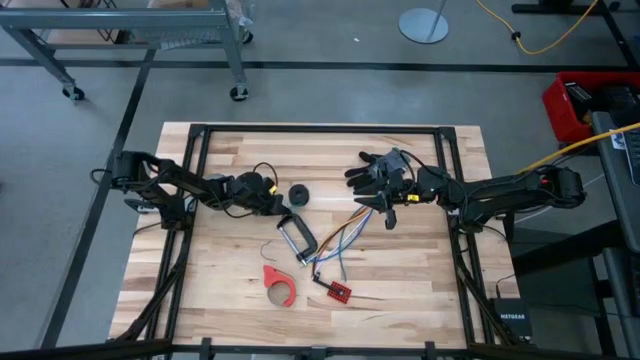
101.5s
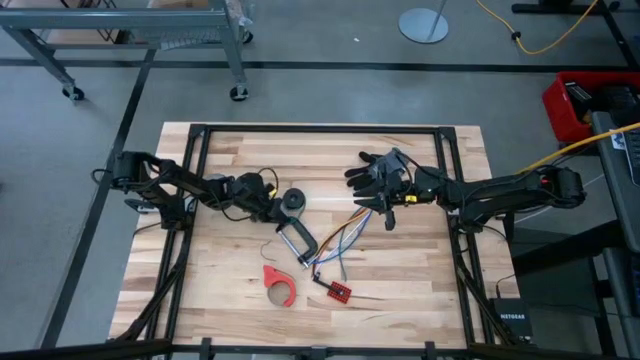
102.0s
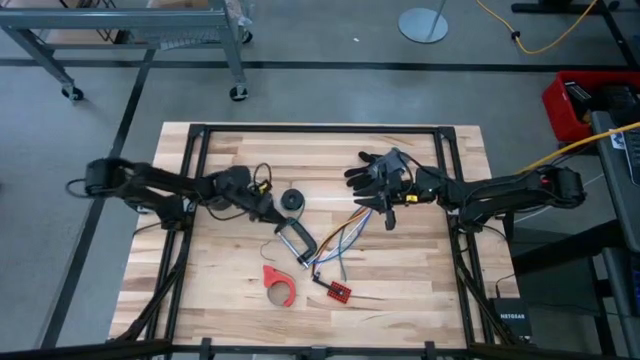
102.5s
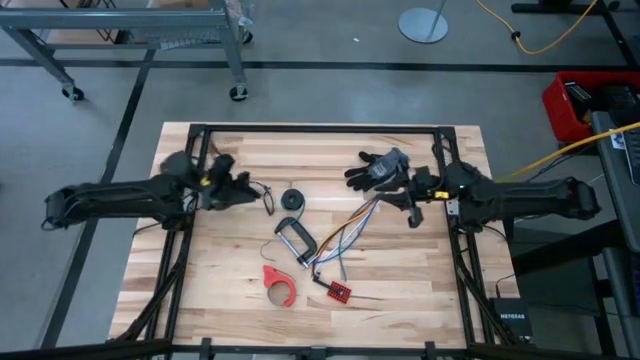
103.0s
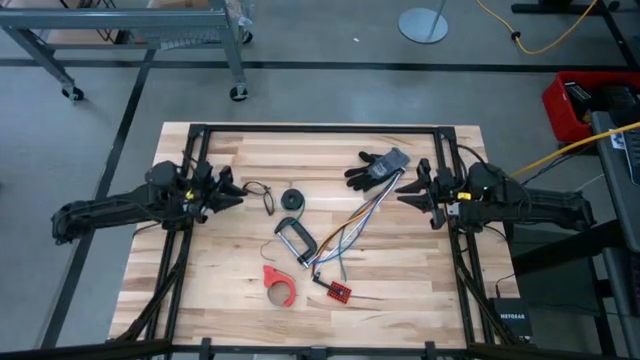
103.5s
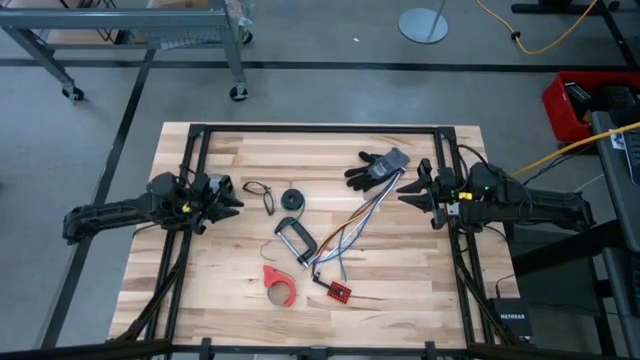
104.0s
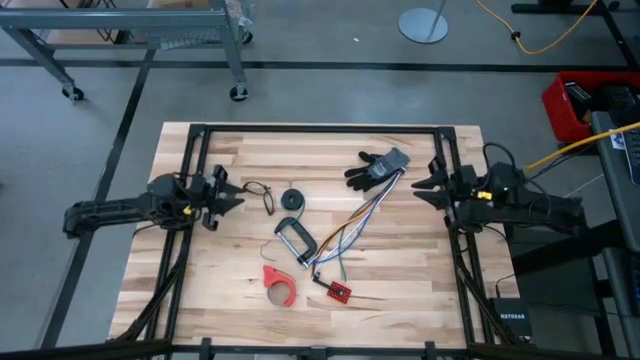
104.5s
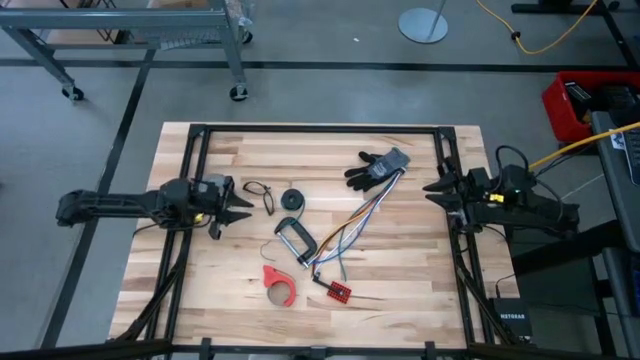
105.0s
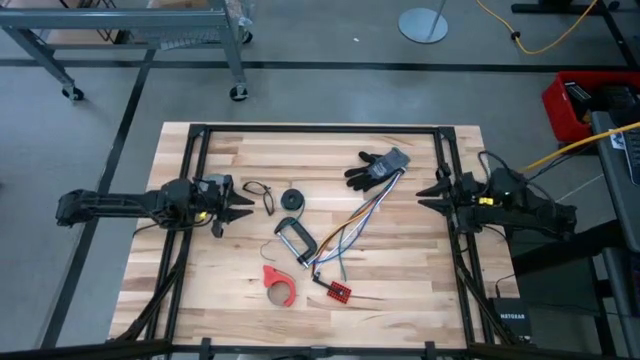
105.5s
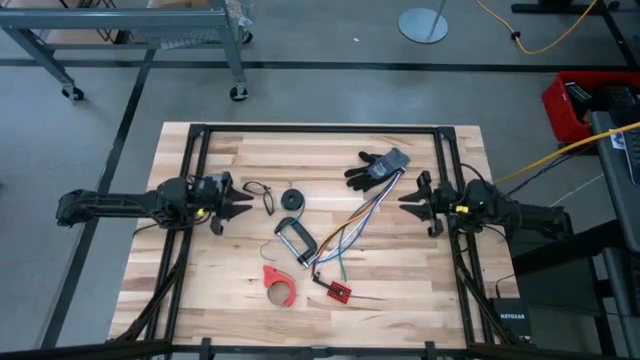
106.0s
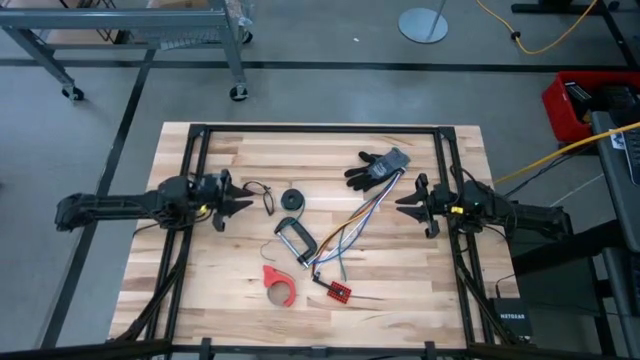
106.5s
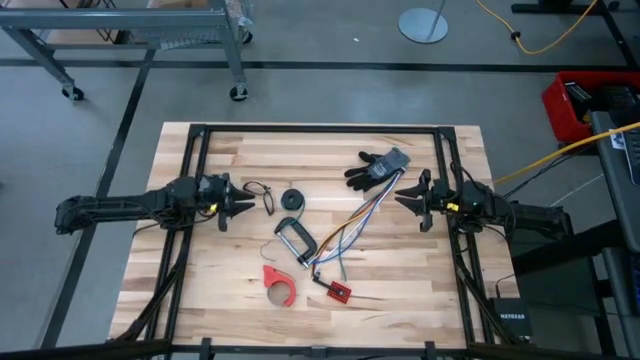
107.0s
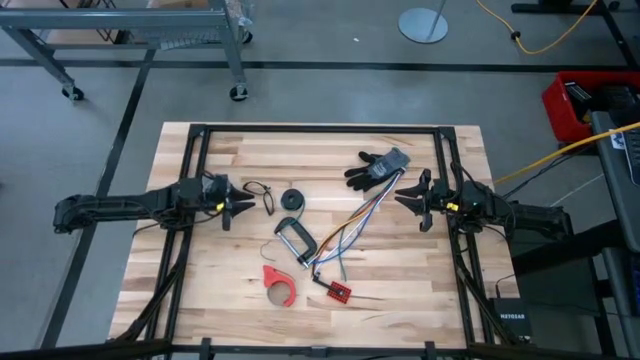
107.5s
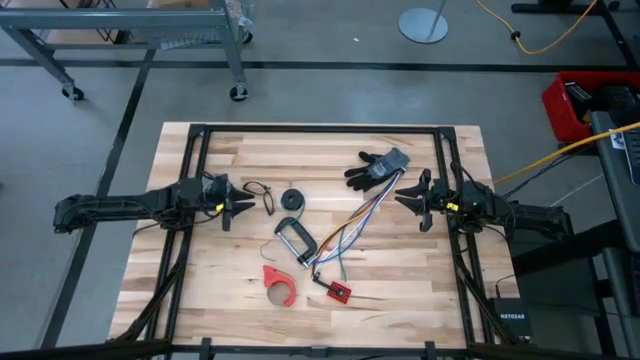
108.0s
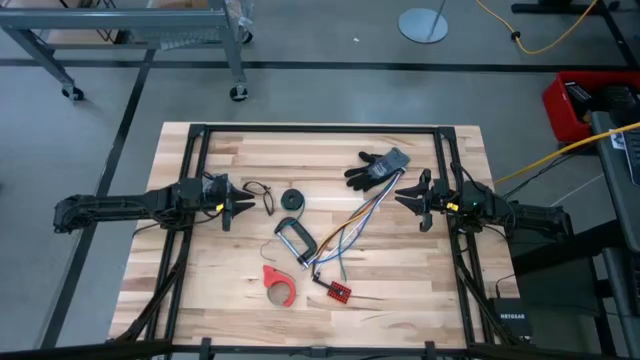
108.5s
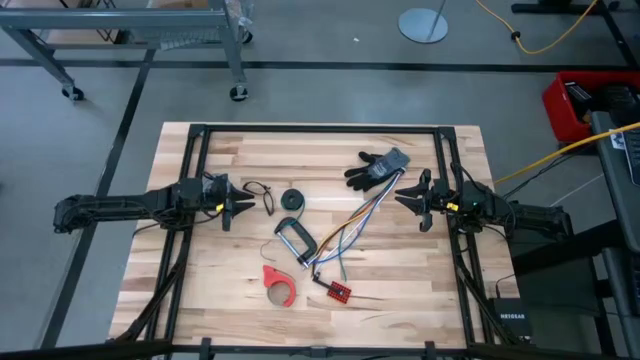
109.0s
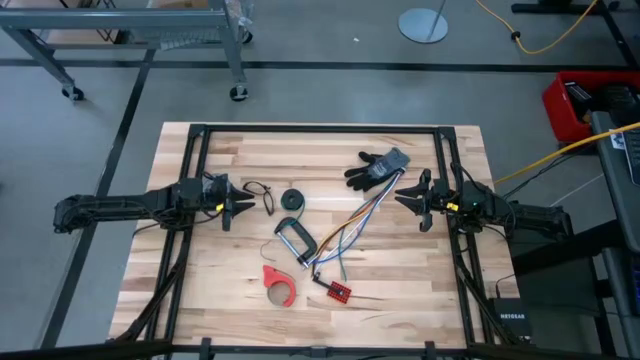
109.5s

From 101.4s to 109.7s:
Task: Coil cords
Return to Home Position

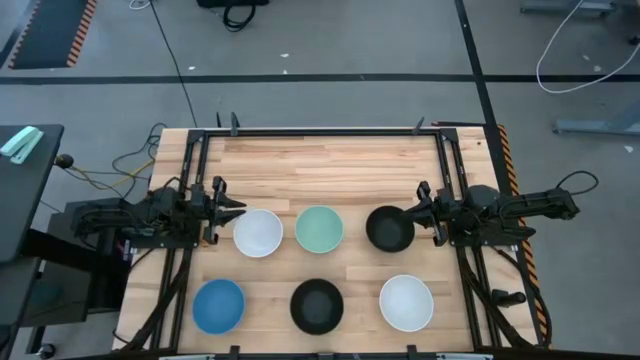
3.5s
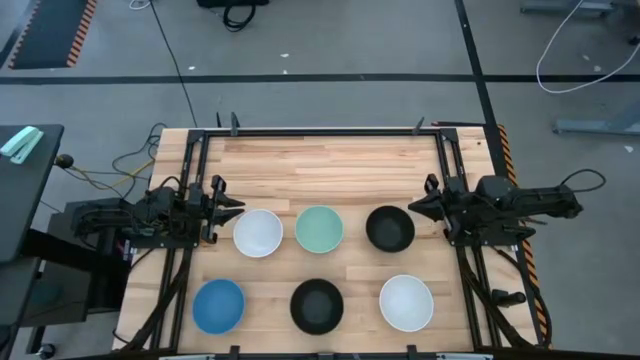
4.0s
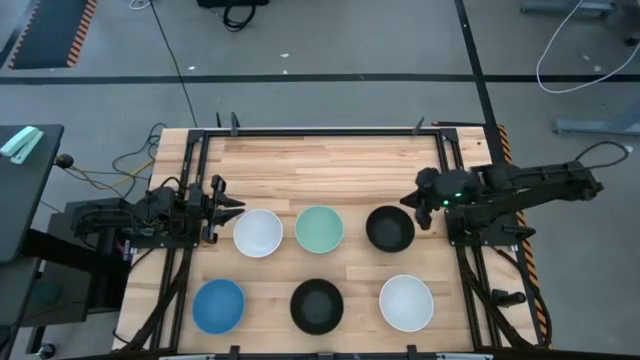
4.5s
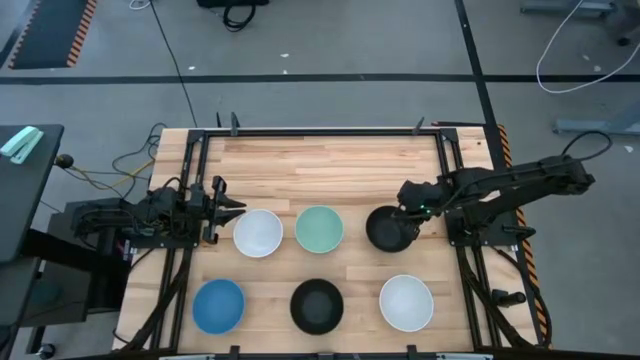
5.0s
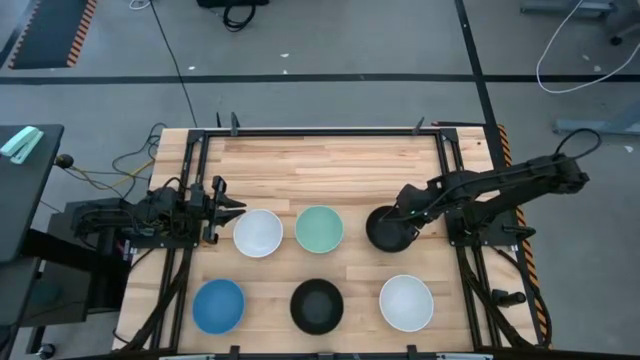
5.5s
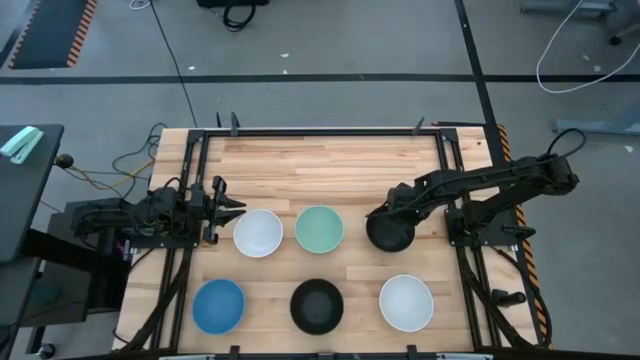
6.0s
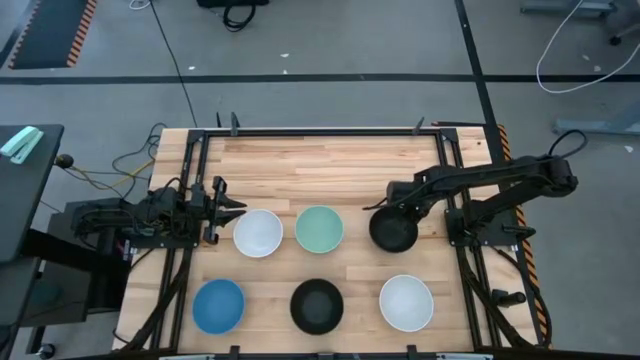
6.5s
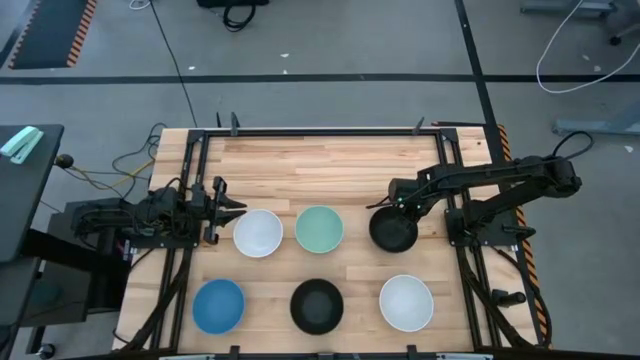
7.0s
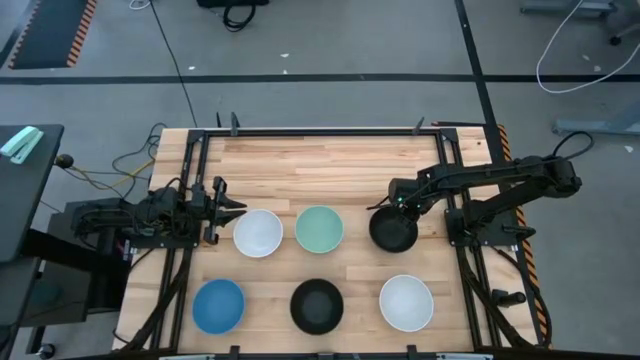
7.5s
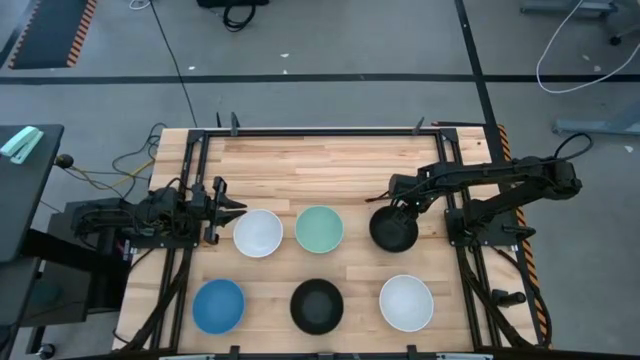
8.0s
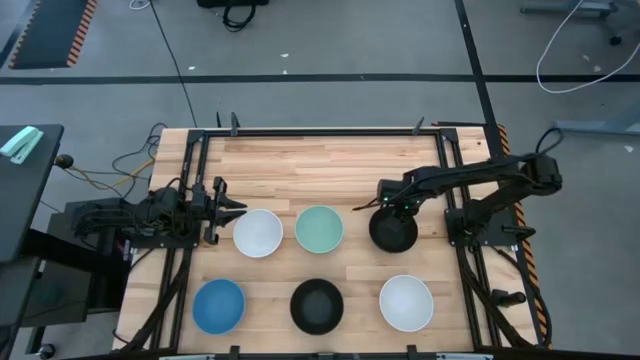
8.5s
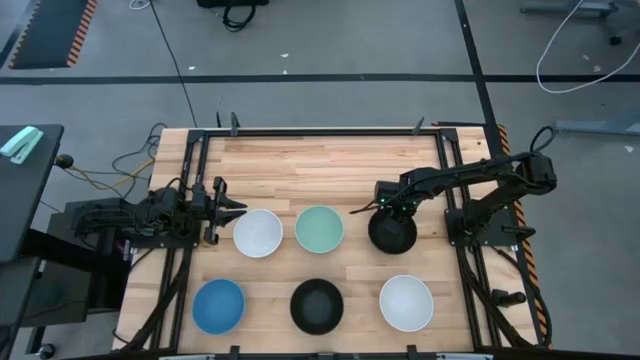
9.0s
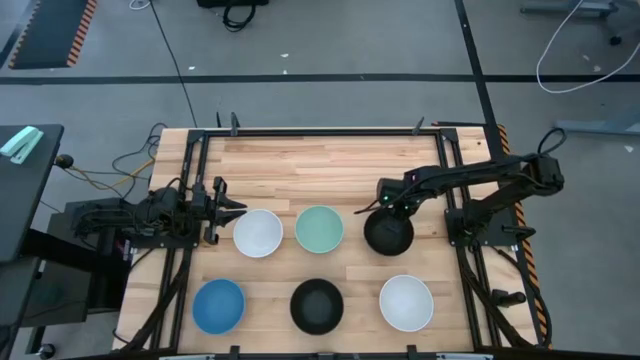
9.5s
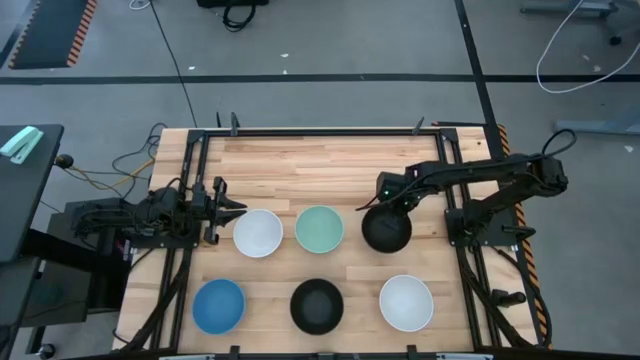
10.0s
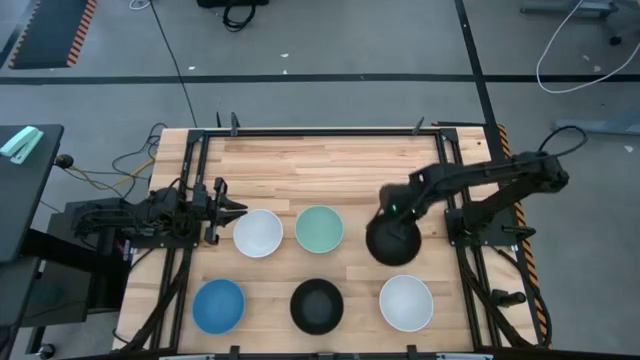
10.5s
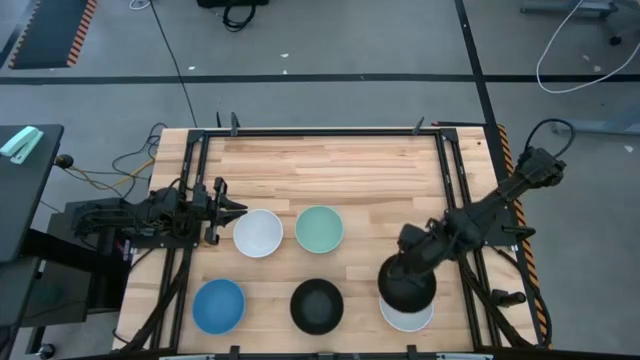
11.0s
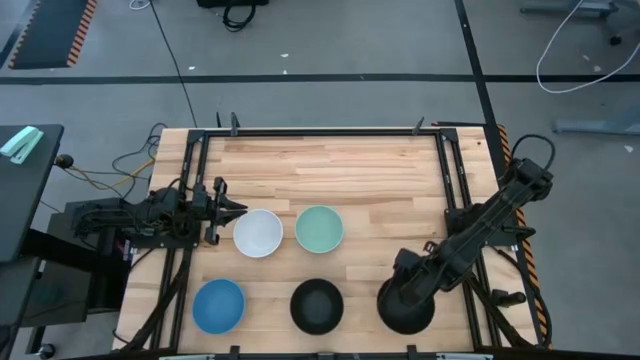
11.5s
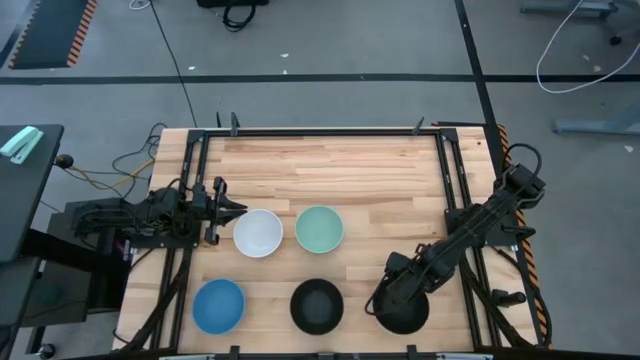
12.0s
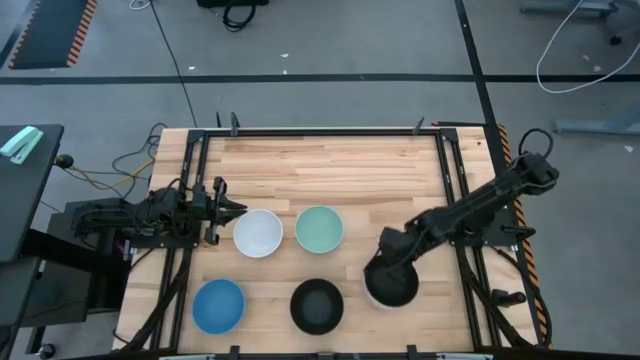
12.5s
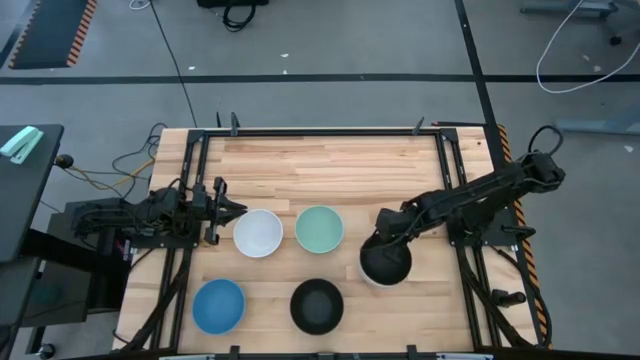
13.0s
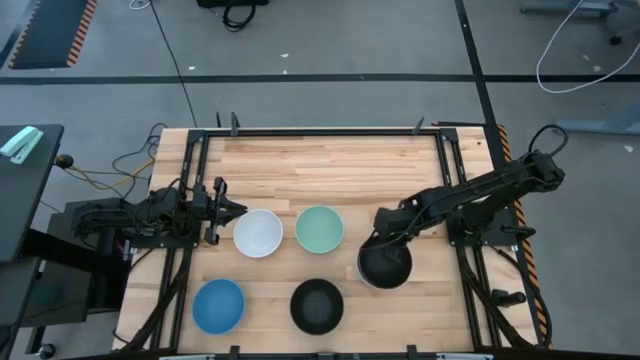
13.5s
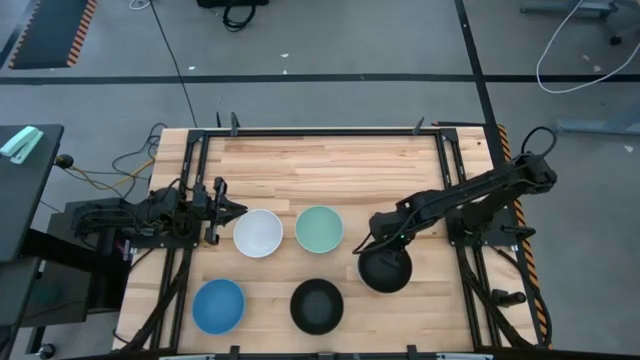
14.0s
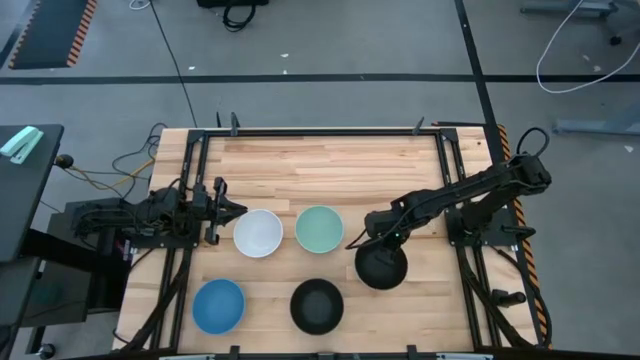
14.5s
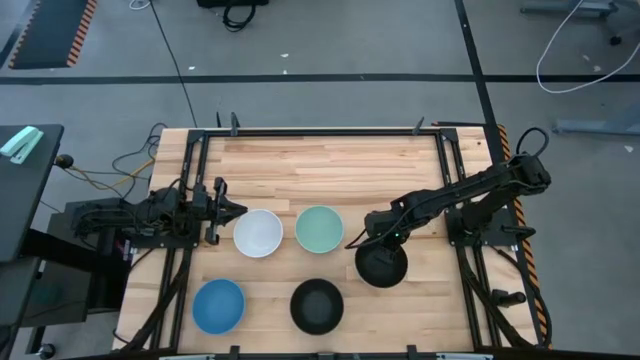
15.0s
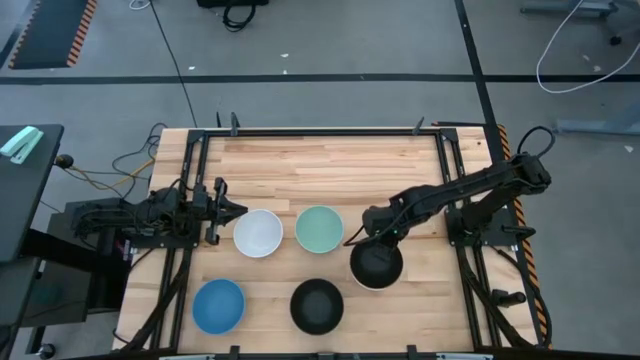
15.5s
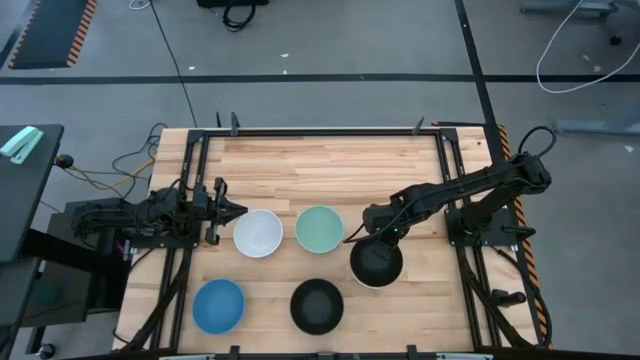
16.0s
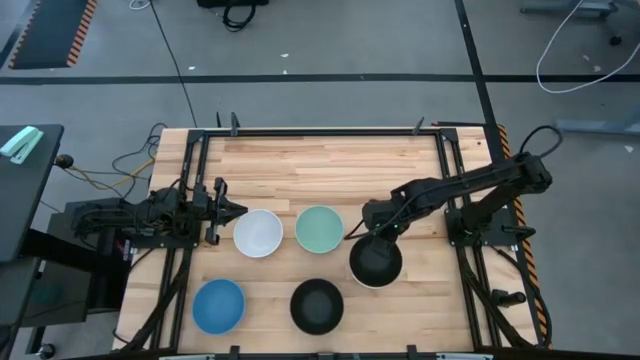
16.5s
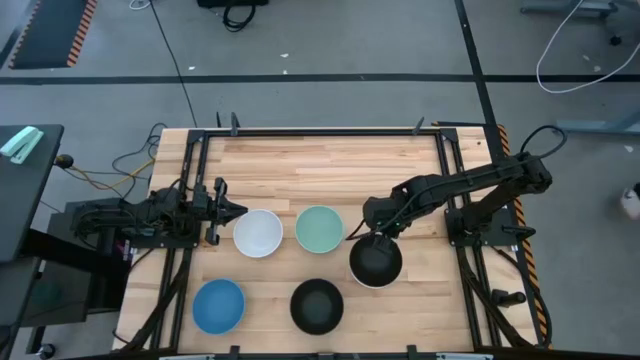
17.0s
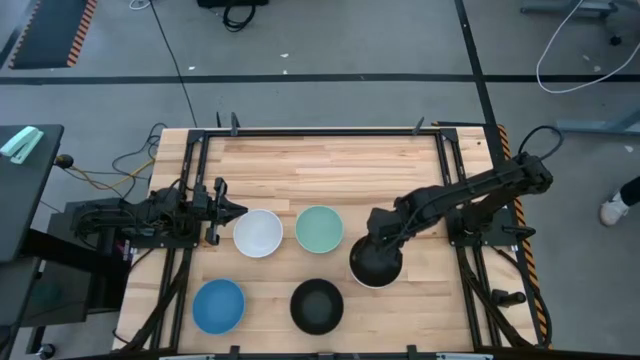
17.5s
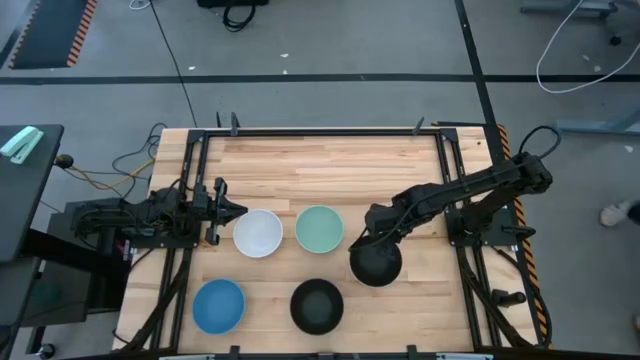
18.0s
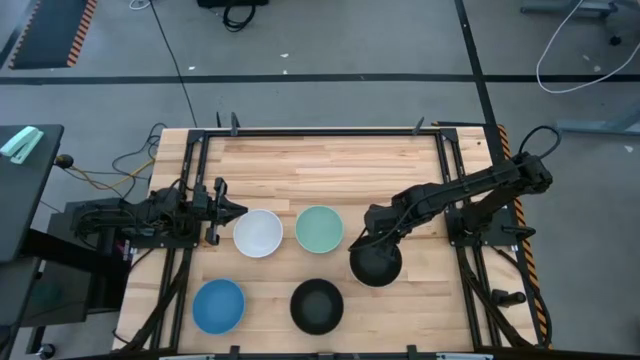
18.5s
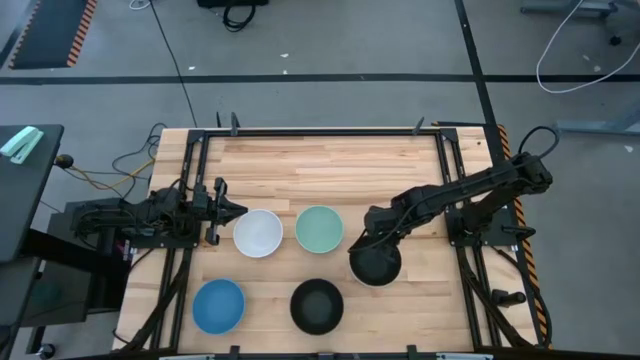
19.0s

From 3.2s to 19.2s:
Task: Nest bowls inside each other
Stack the top black bowl on top of the bottom white bowl
